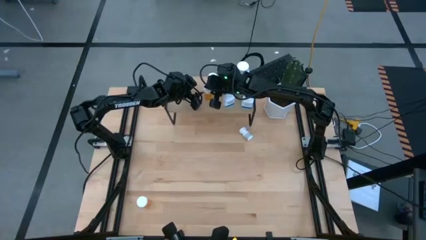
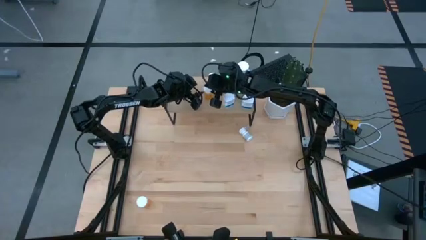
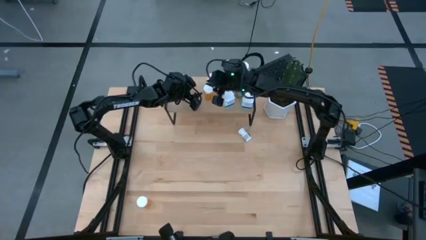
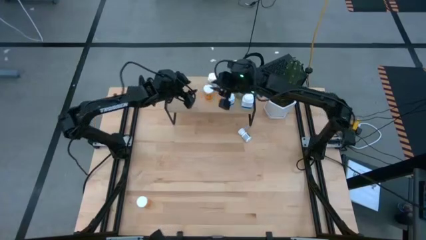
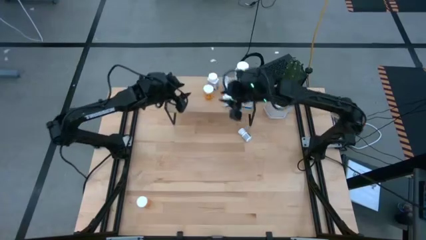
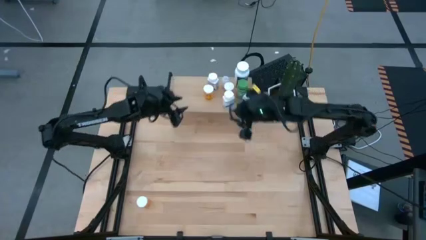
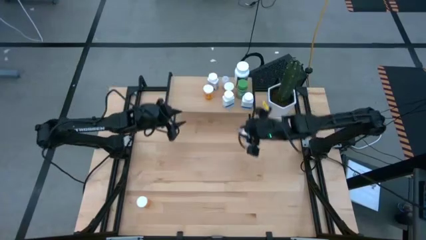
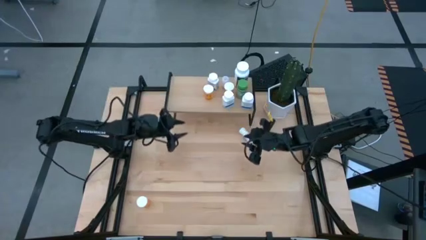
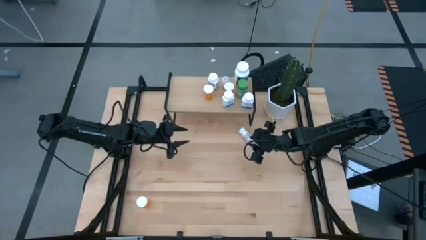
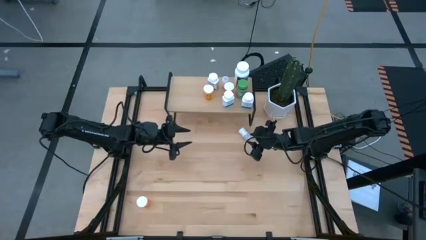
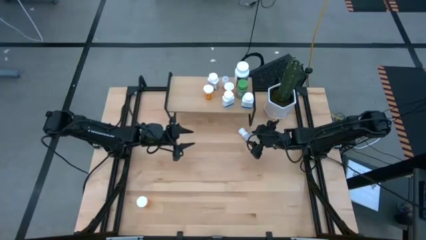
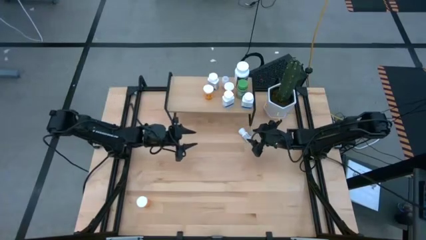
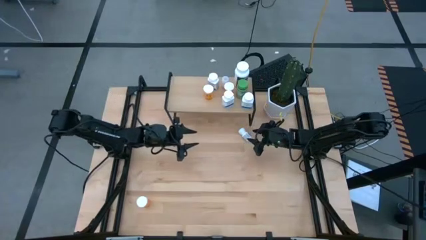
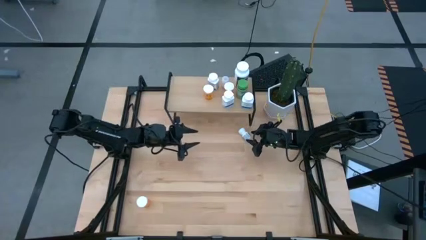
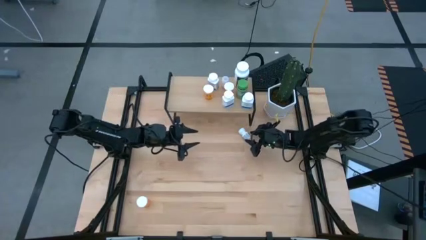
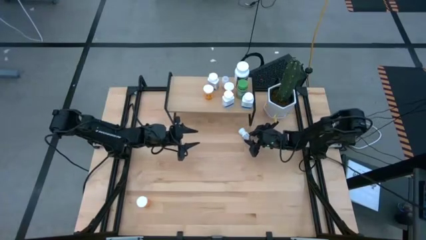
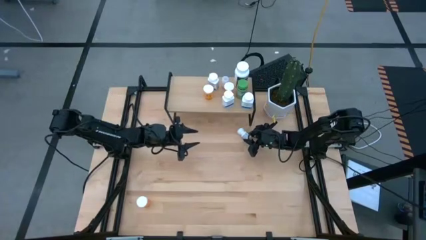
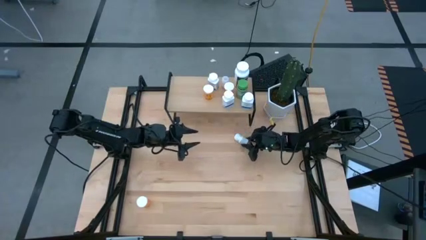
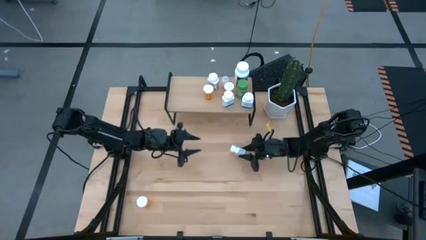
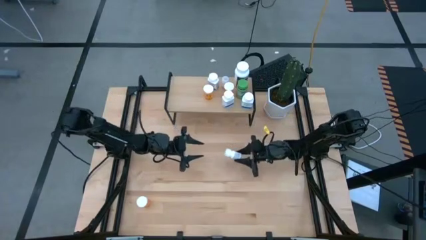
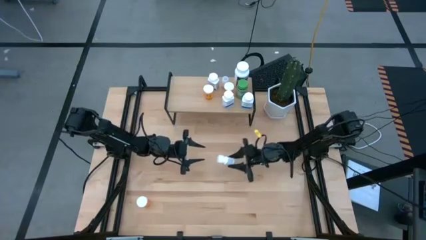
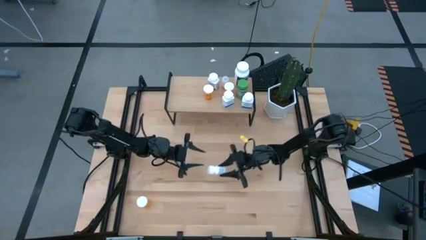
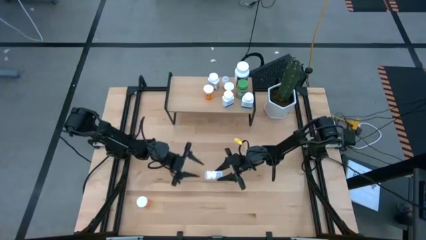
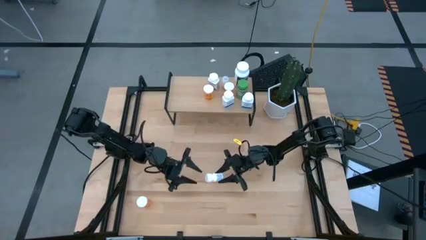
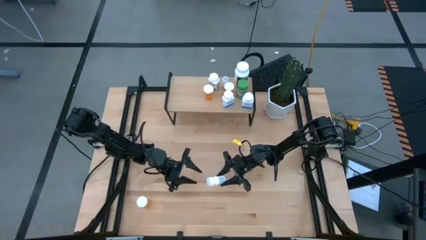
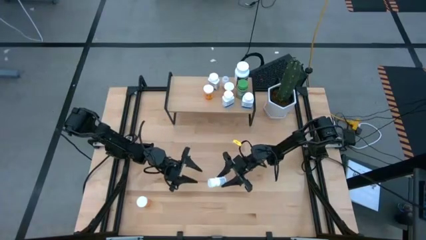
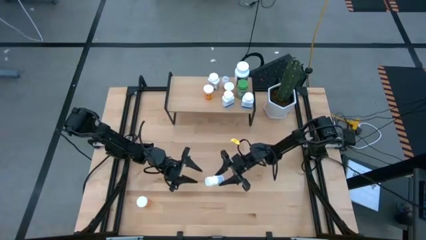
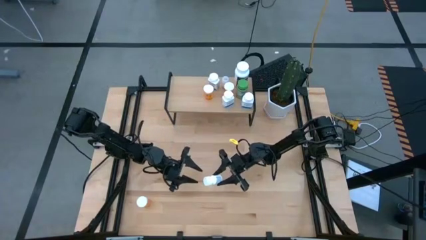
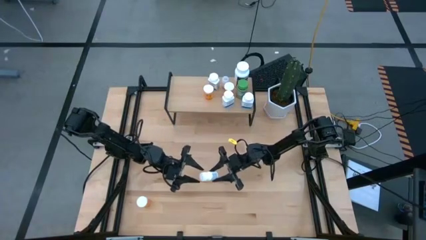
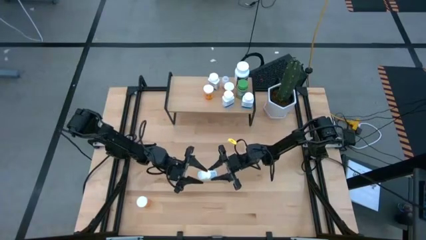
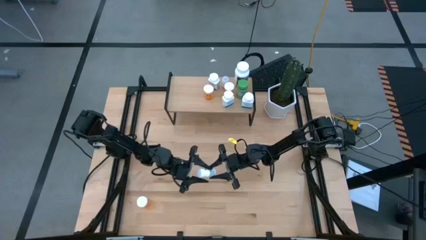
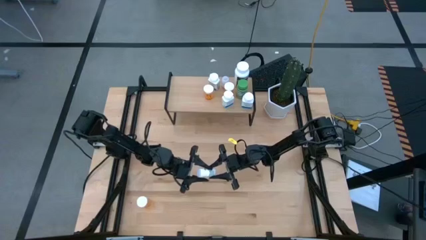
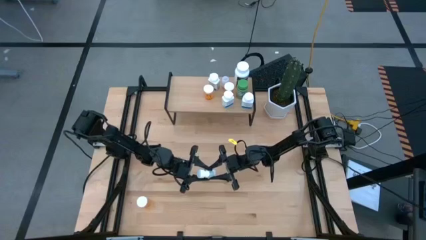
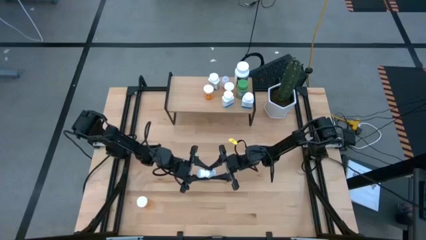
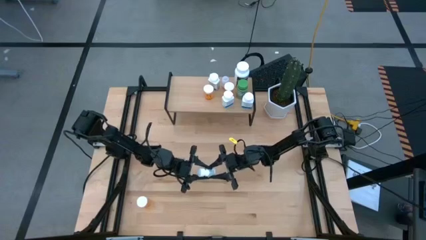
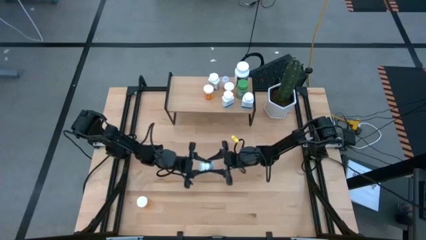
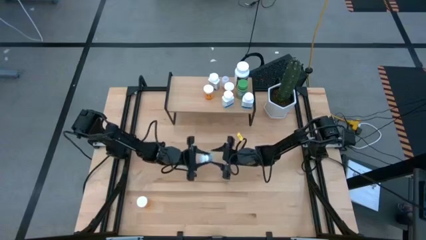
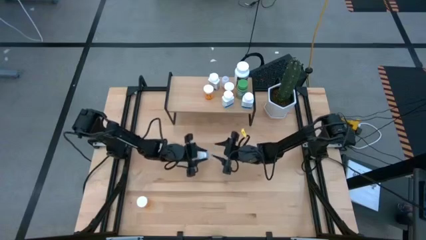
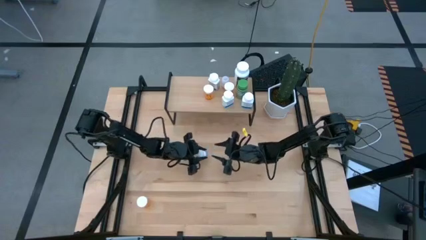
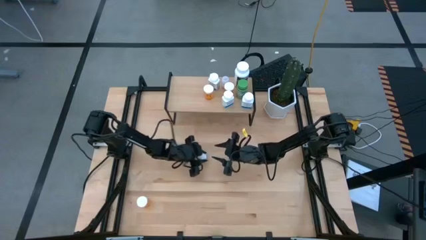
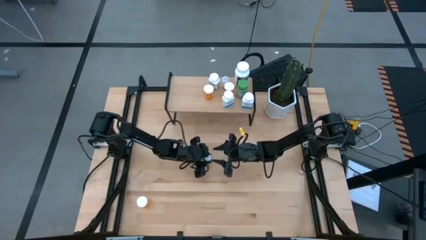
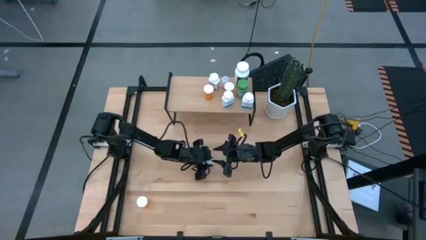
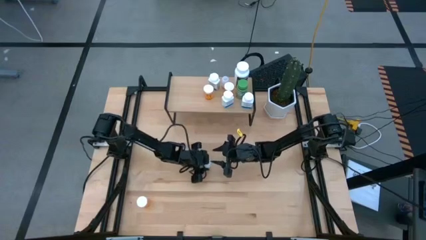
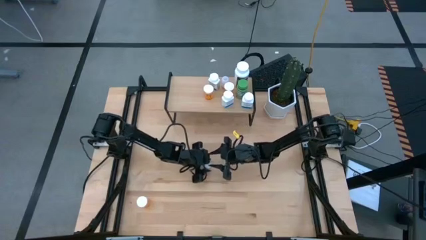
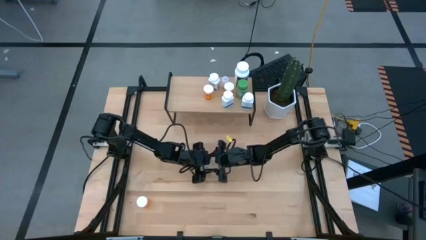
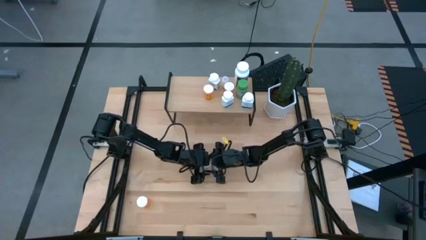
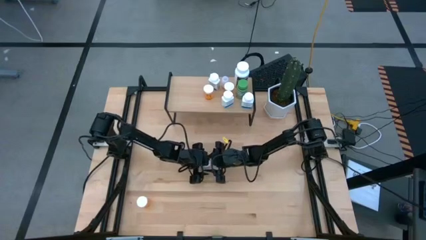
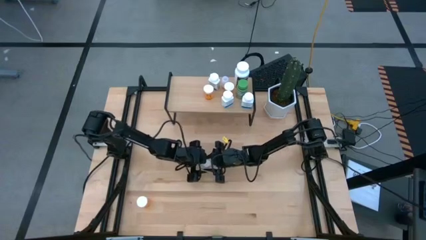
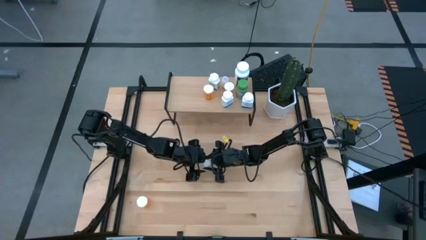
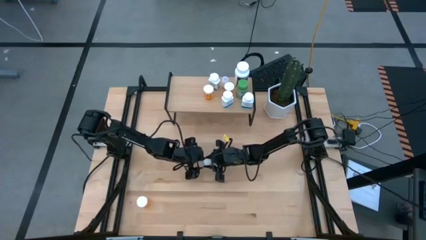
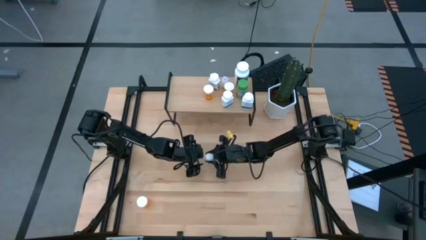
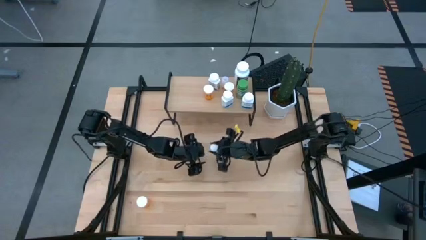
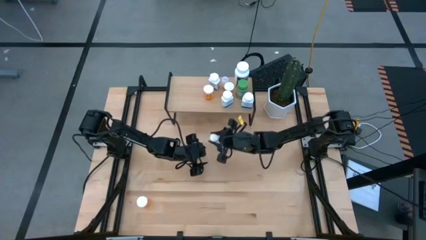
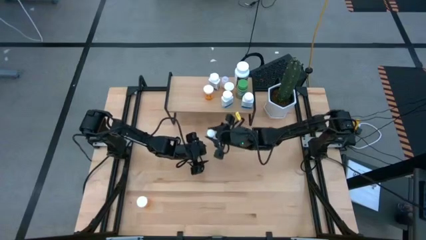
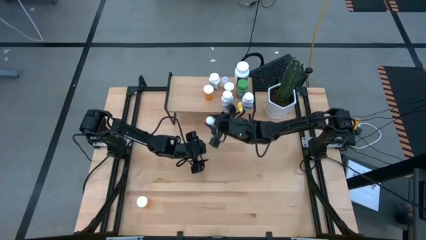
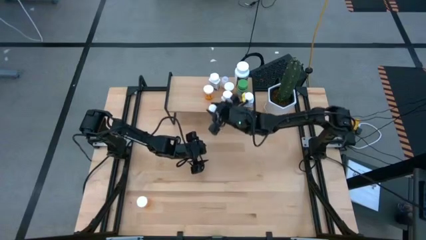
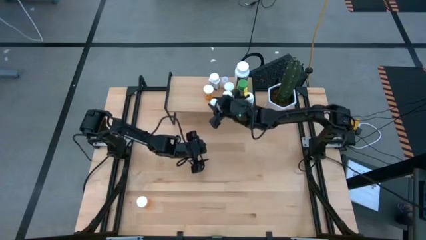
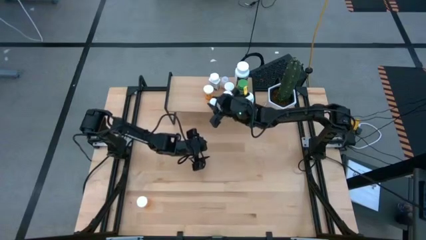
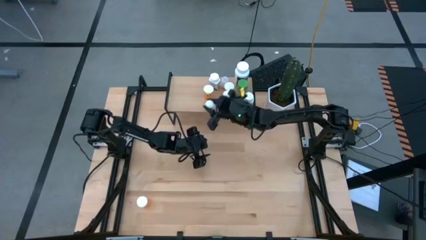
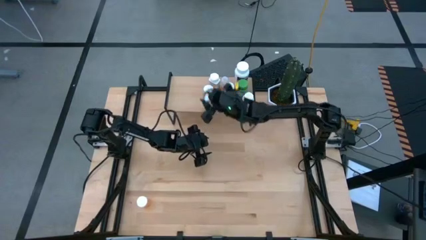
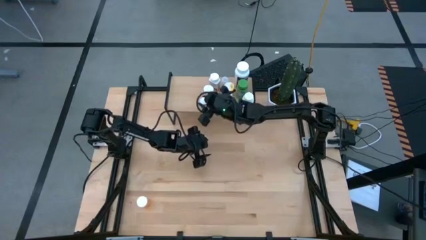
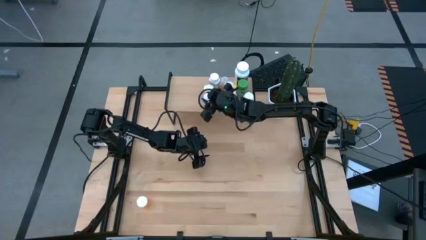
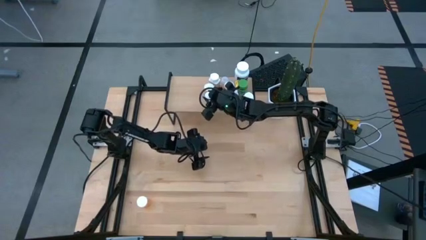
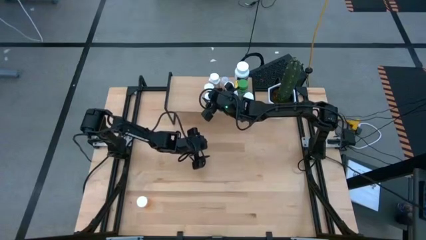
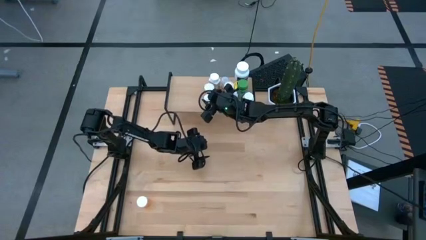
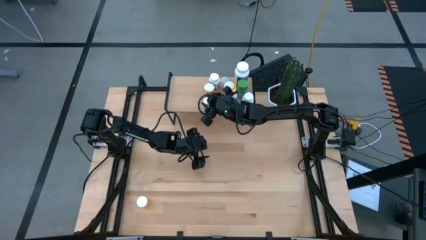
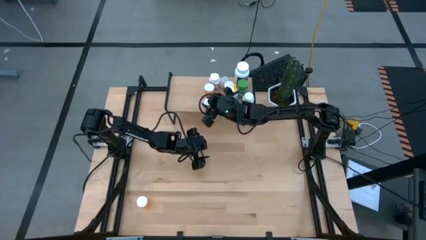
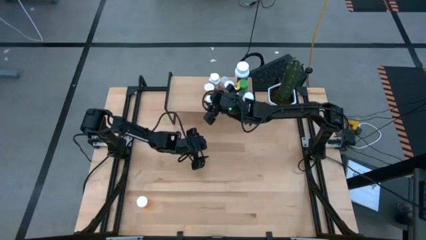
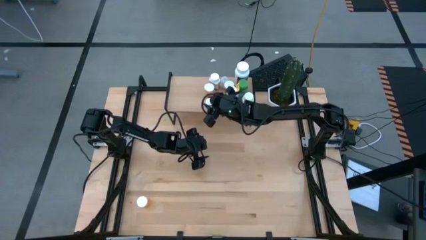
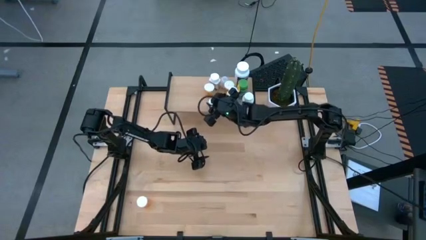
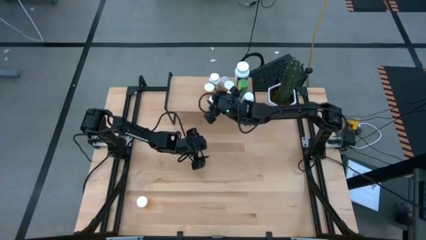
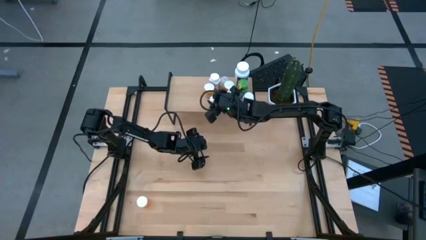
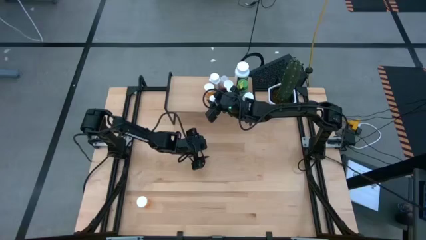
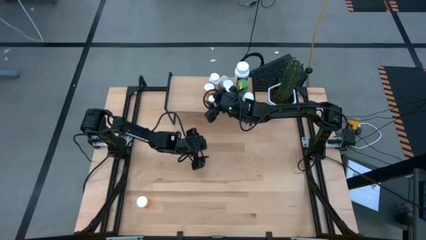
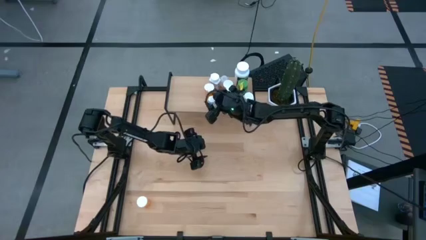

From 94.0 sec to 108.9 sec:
Task: Pick and place medicine bottles onto shelf by color
Put the white black pill bottle on the shelf

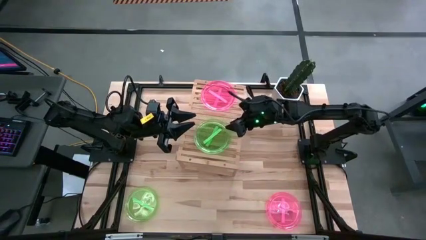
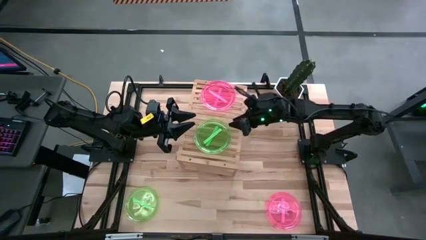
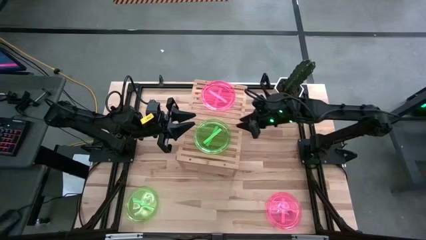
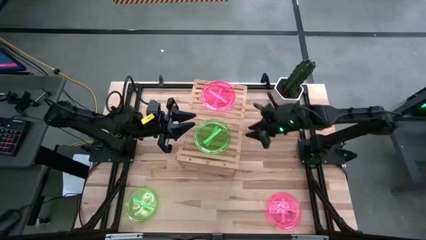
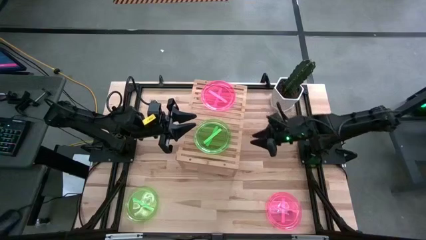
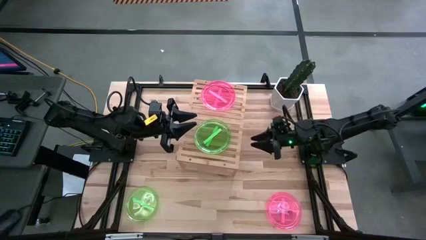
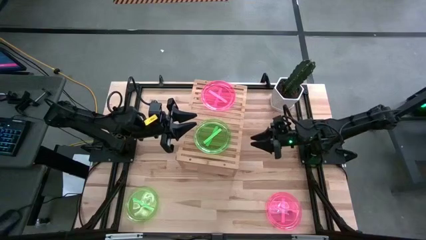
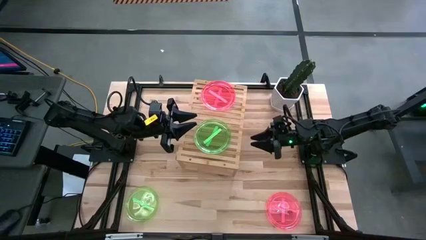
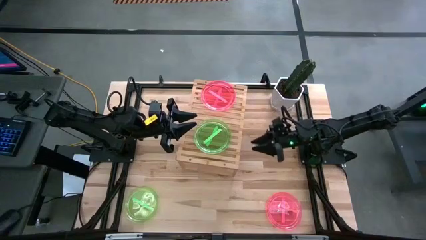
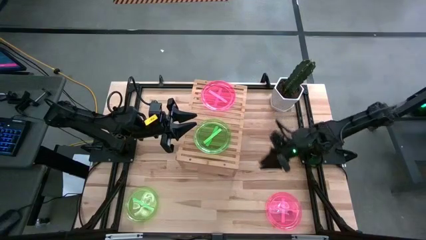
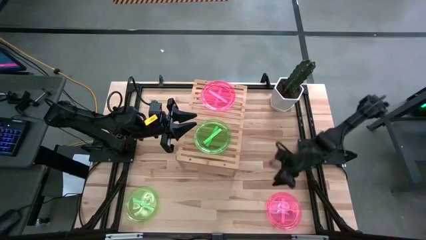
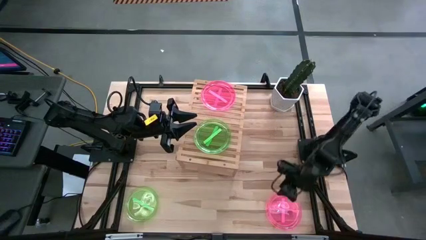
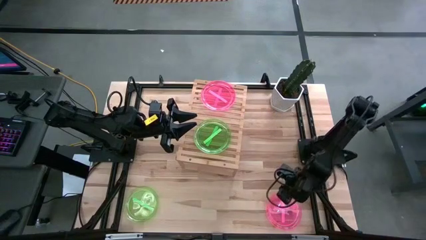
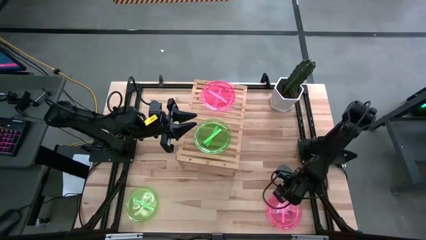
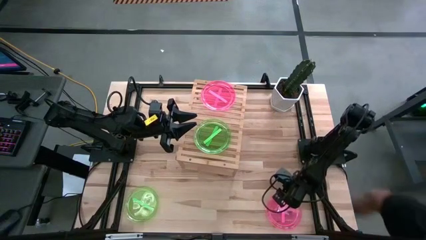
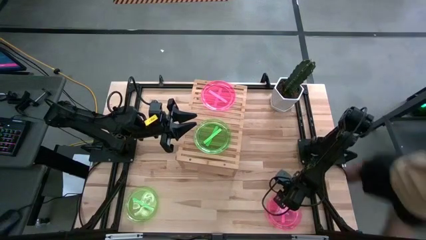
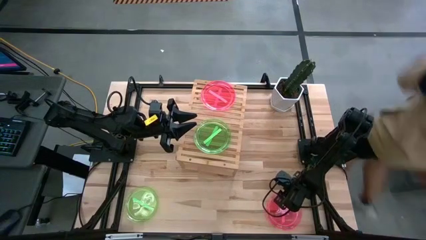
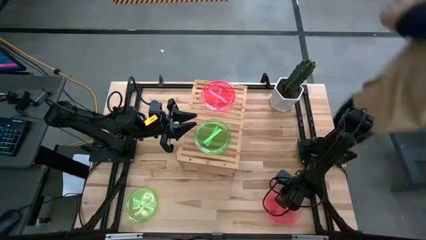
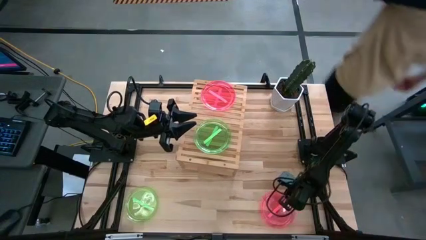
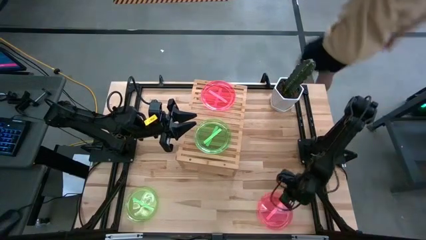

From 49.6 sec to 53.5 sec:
Task: Place and stack plates onto a shelf
Stack the pink transparent plate on top of the other pink transparent plates on the shelf
